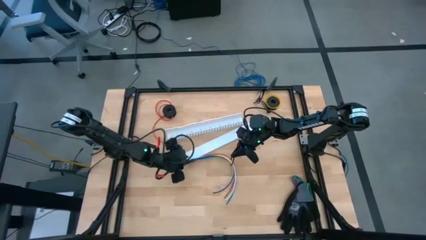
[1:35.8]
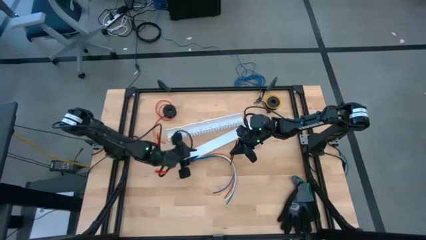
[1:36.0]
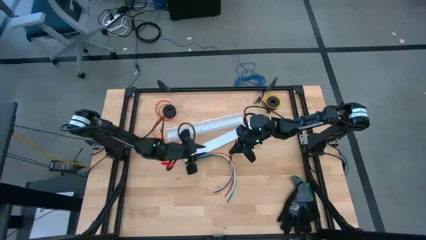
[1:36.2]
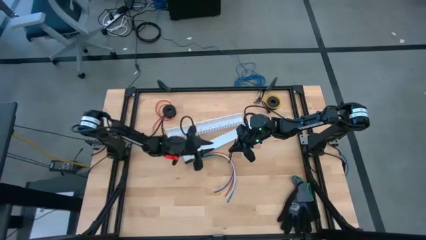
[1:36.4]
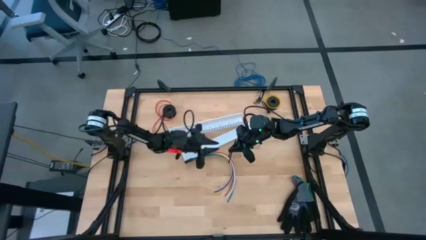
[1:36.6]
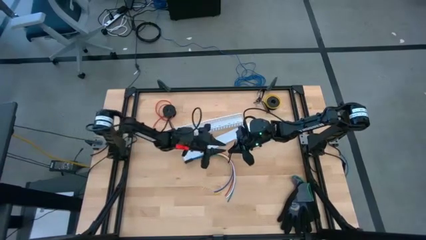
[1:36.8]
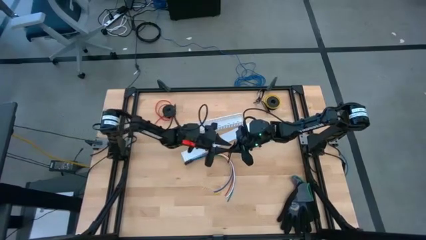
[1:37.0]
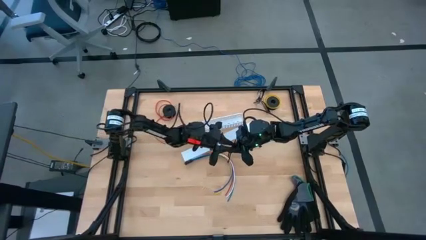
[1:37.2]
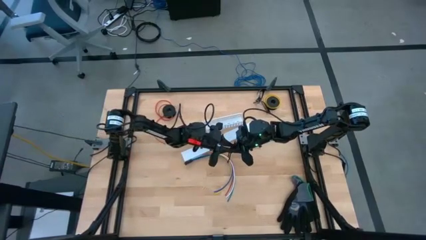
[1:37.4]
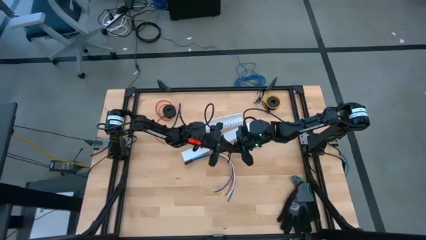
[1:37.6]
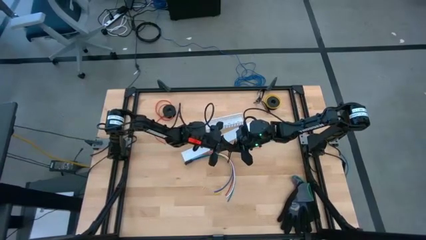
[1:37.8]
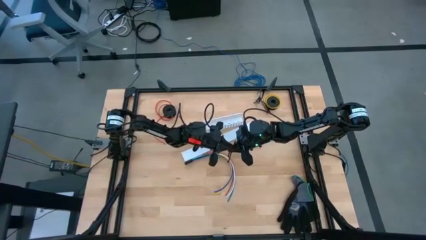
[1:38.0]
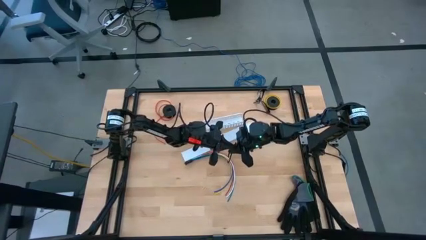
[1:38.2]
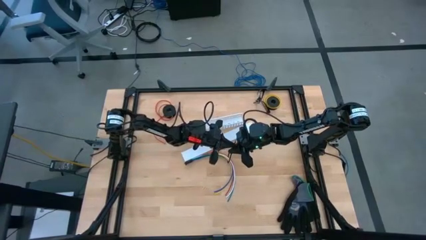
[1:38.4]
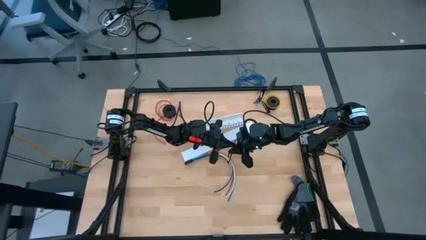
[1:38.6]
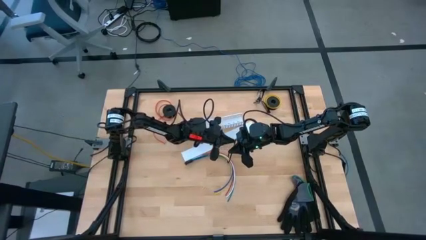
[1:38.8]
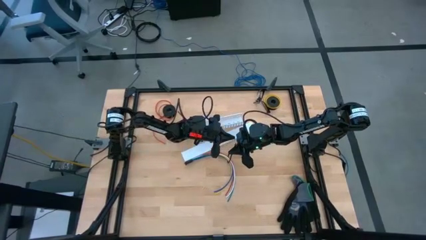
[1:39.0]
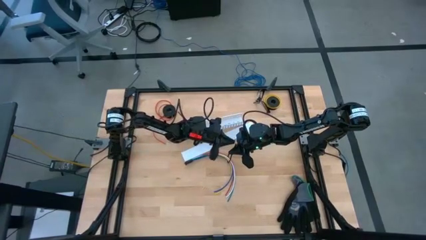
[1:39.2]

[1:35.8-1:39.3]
Task: Ziptie cables
Wrap the cables together using the black zip tie

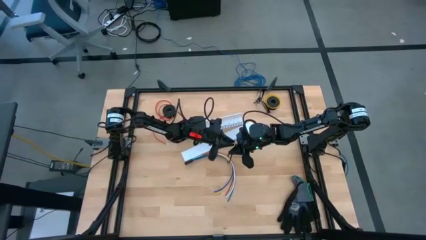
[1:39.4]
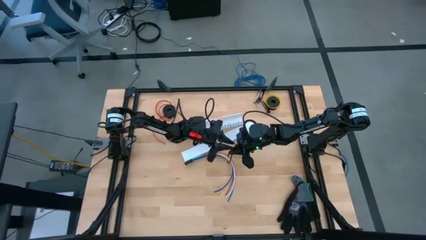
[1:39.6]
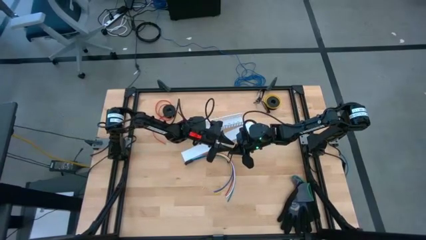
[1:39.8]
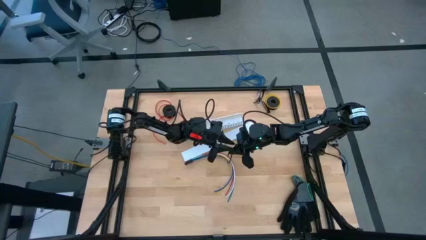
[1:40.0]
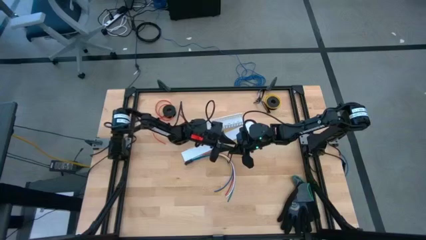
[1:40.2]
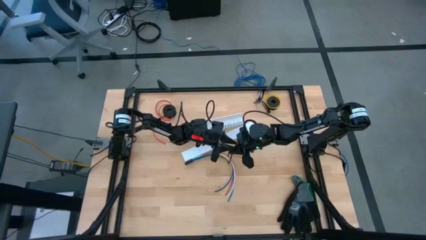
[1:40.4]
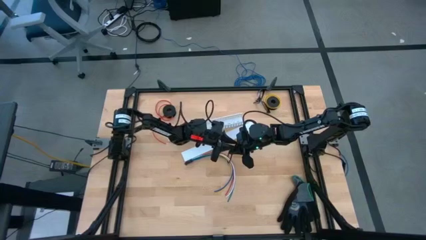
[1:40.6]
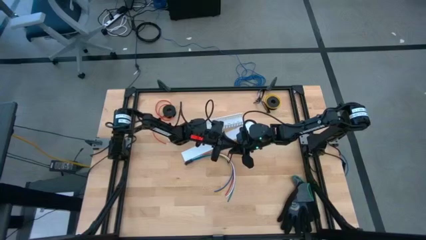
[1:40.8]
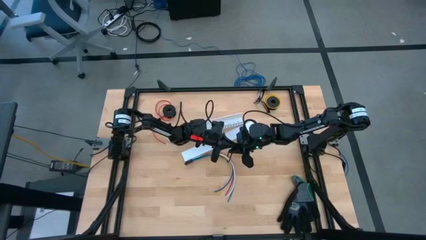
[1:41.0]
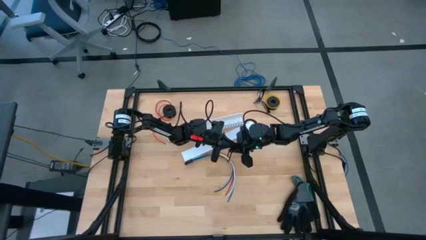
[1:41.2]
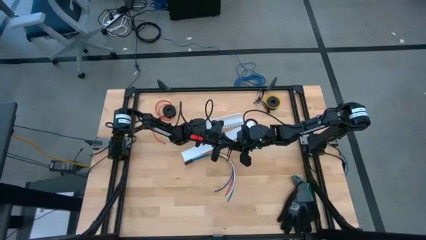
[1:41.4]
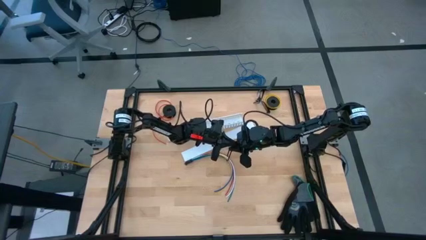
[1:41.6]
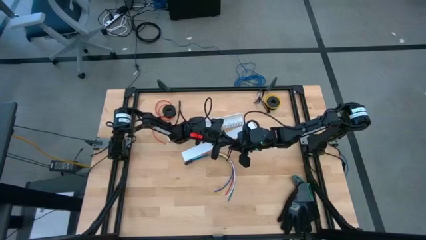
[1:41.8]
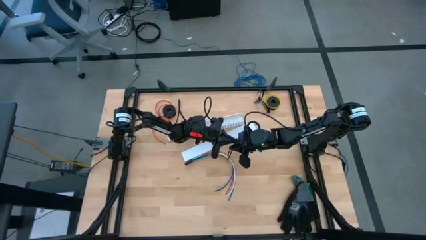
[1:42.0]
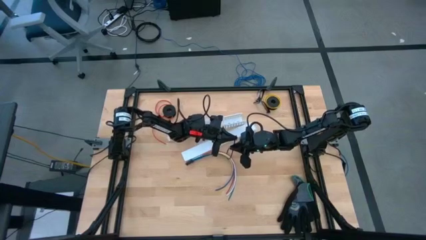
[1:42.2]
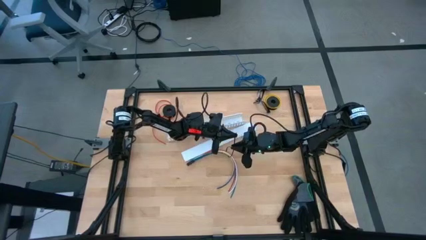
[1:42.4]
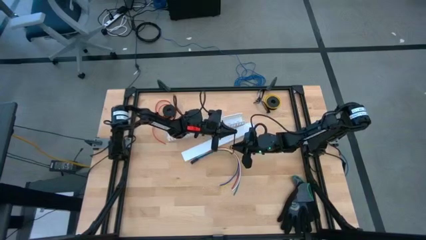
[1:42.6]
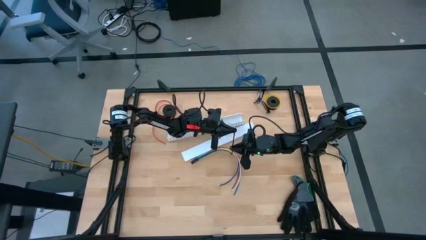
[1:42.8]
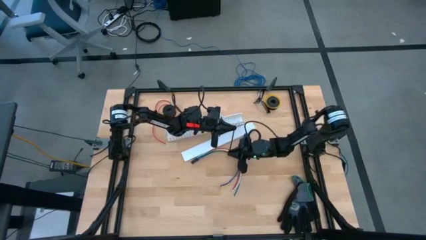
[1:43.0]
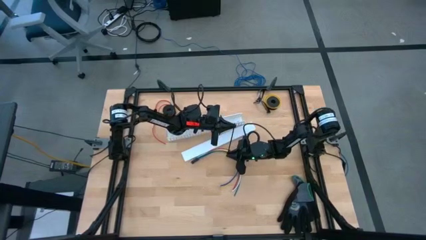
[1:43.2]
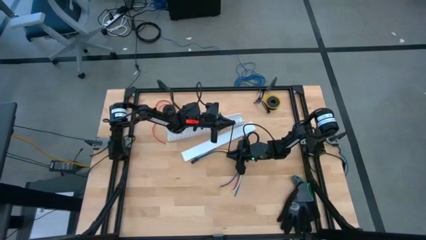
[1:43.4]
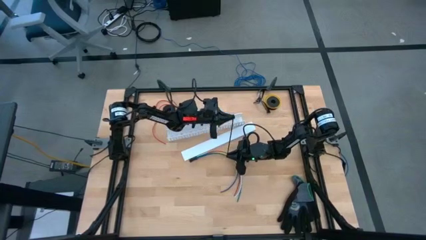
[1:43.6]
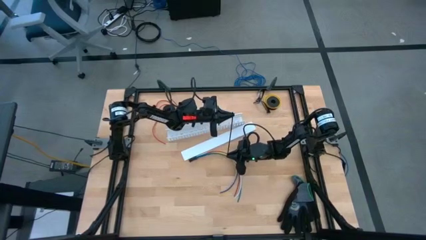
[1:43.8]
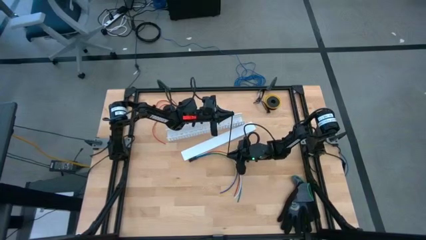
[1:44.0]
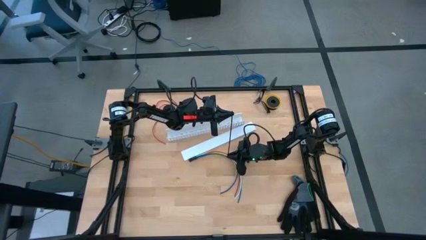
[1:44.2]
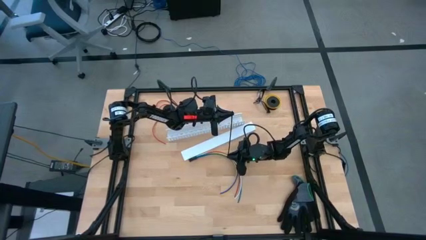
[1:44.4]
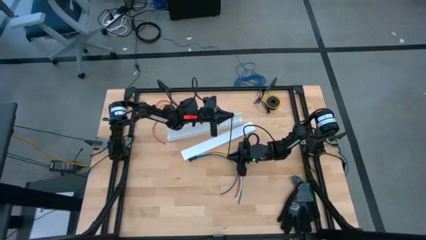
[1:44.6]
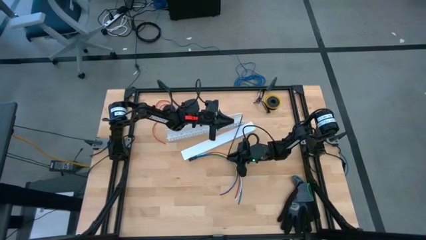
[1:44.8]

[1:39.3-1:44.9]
Wrap the cables together using the black zip tie

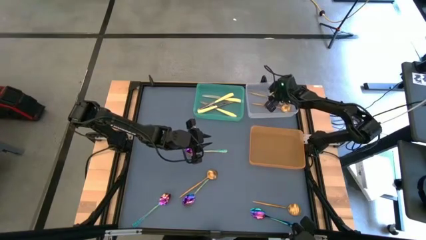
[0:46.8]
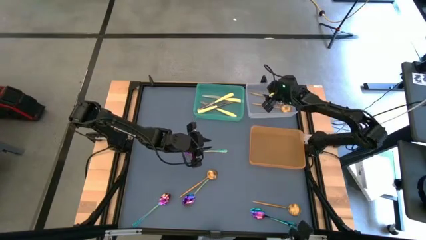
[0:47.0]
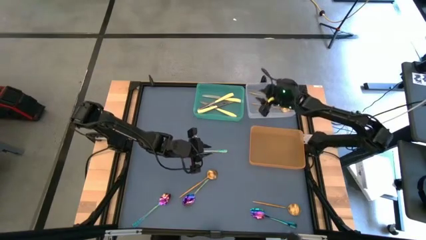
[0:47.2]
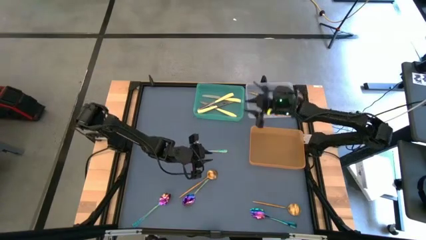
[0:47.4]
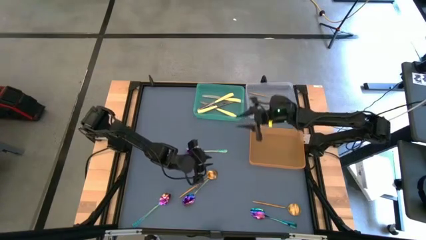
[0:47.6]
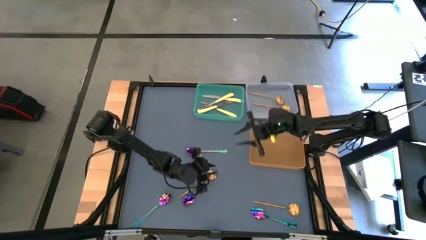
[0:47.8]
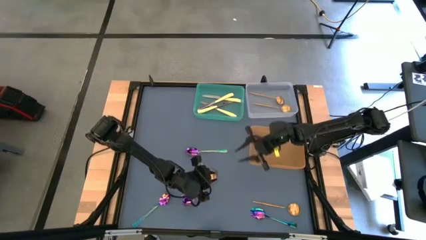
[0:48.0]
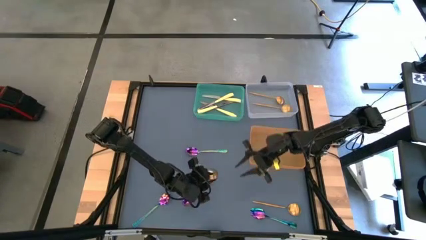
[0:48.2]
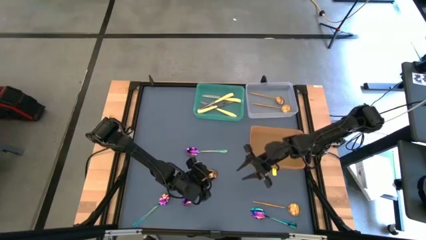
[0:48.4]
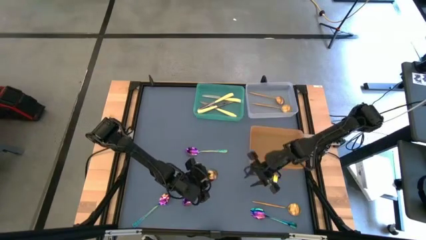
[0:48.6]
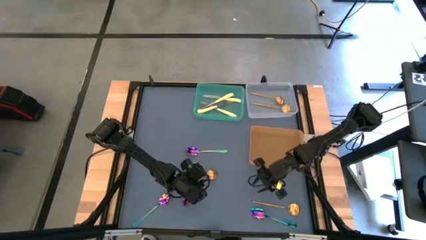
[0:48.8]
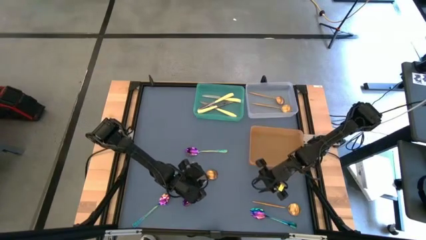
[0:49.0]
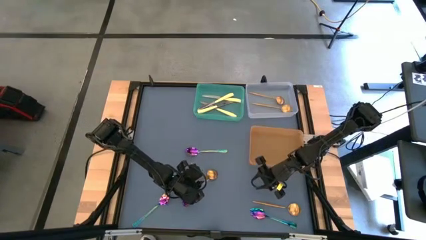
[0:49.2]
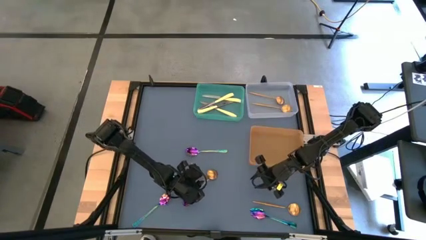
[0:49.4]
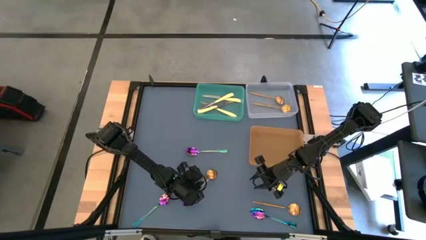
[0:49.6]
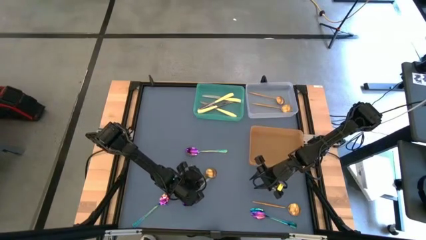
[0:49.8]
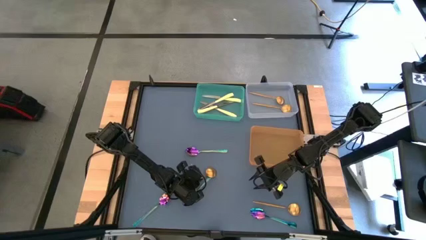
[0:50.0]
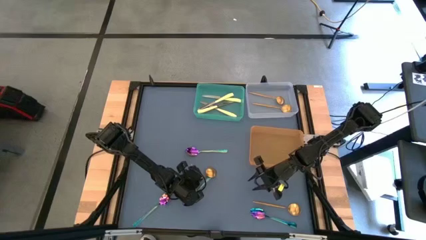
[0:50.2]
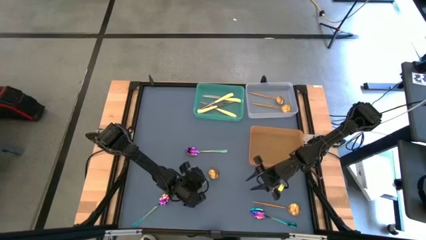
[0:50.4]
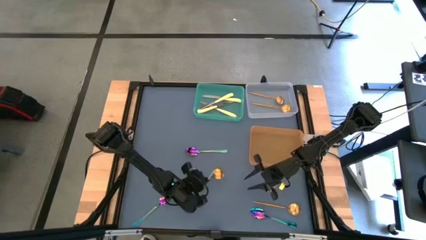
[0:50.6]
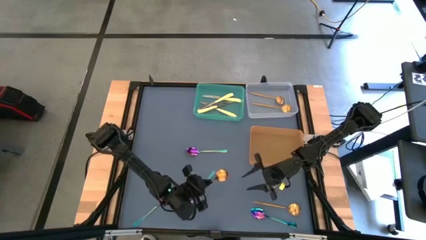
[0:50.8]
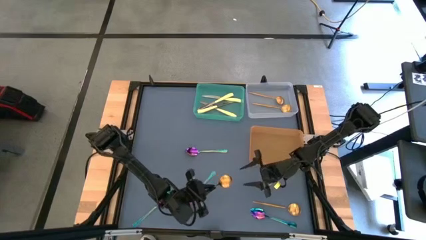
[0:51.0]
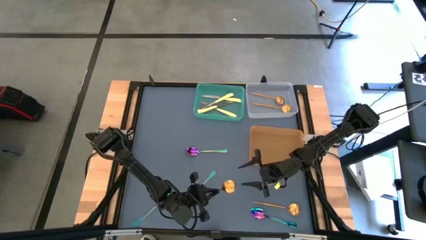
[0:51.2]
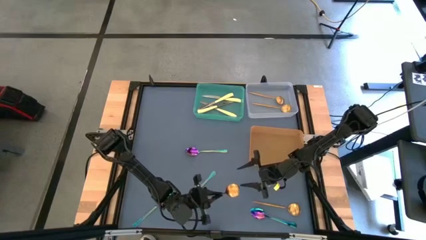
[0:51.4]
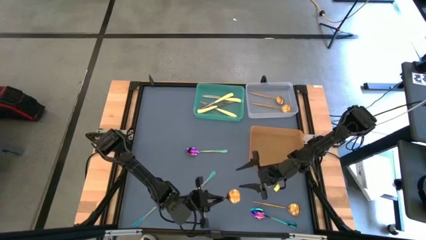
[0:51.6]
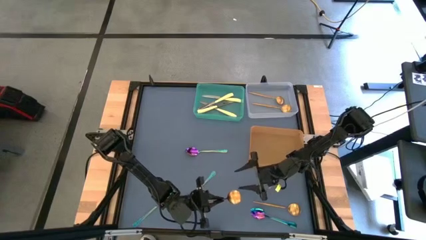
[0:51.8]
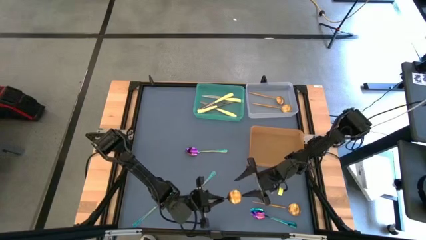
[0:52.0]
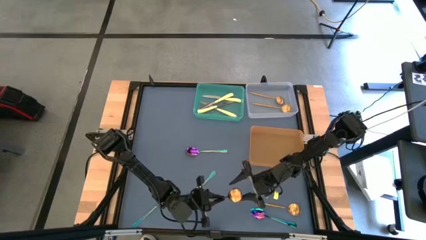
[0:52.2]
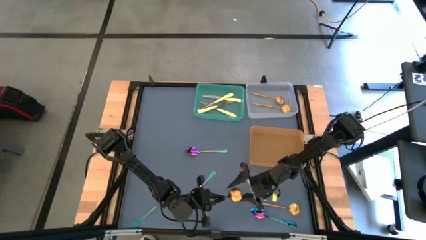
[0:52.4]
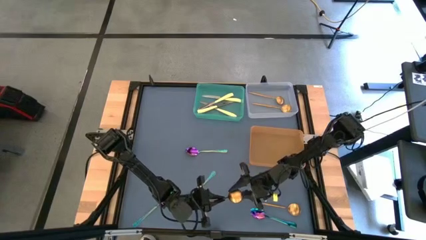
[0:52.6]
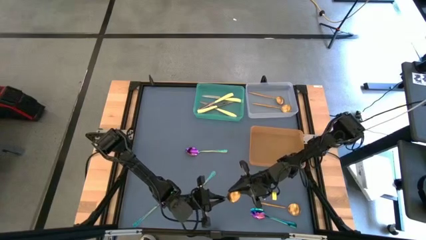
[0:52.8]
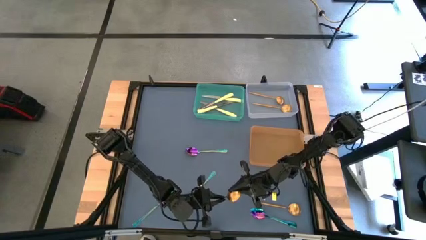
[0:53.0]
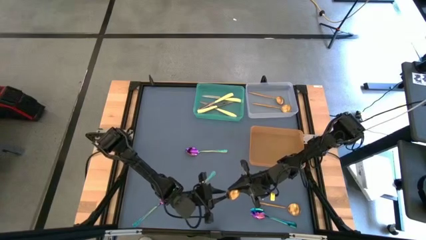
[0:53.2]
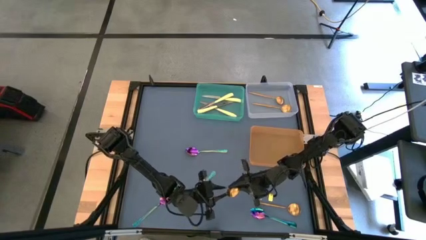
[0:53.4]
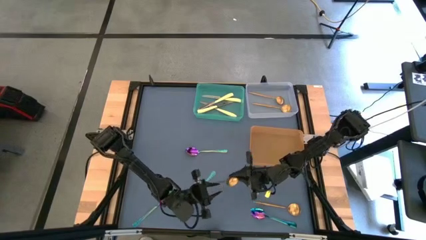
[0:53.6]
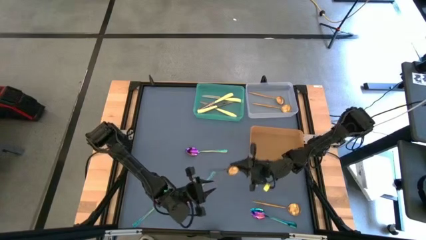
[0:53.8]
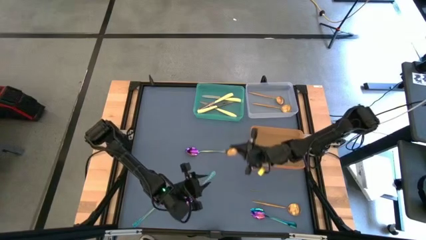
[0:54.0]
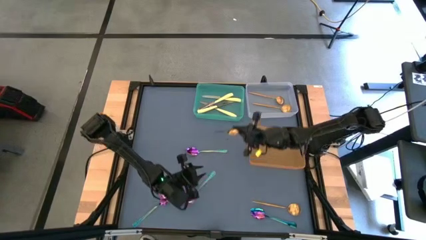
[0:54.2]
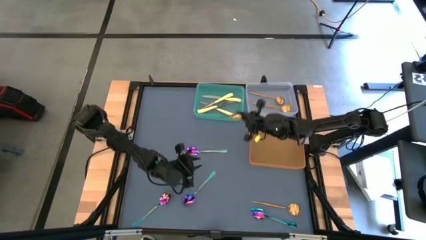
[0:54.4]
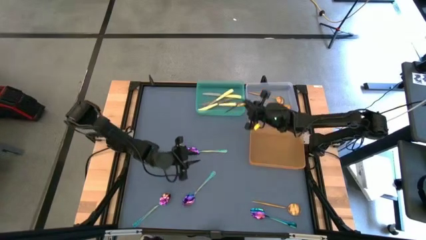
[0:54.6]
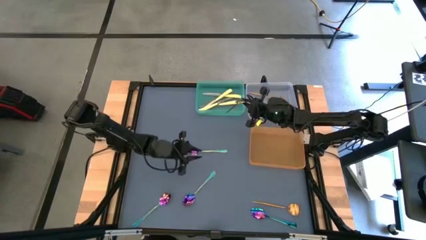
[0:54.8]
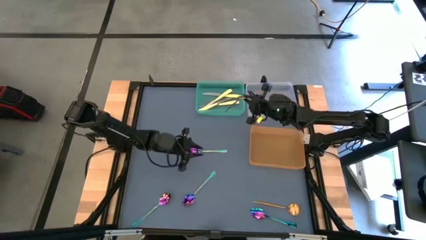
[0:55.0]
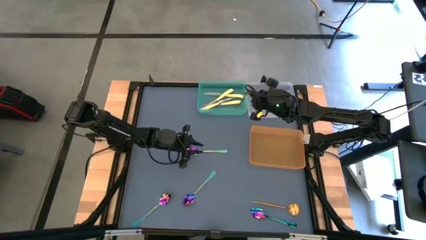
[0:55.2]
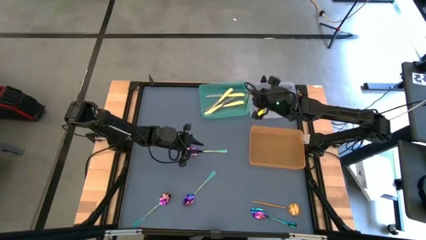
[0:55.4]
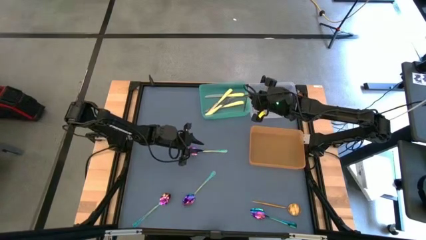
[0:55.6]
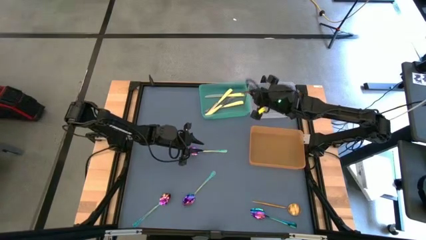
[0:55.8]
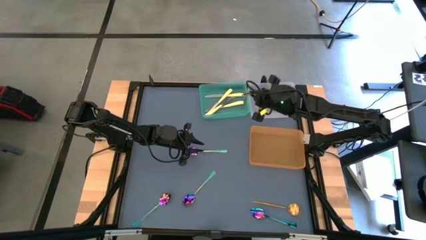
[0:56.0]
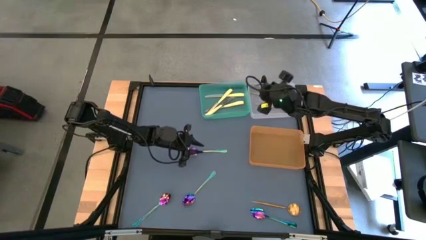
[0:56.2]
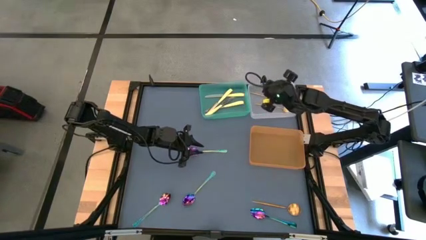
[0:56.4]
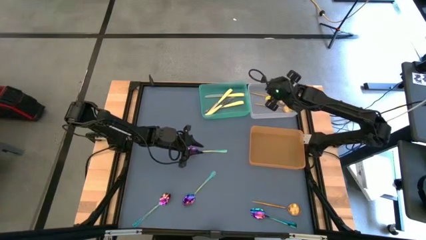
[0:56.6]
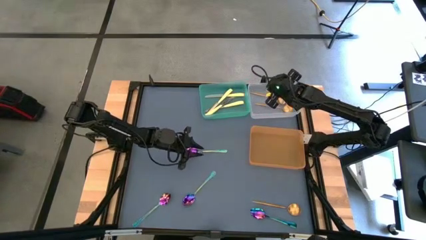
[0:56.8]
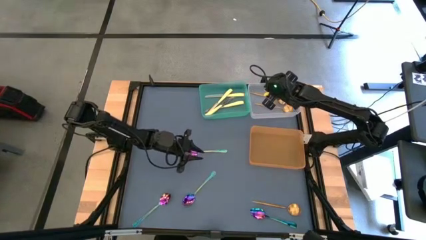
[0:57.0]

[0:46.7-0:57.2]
Task: Sort silverware by color (type)
Put the gold spoon into the transparent bin
